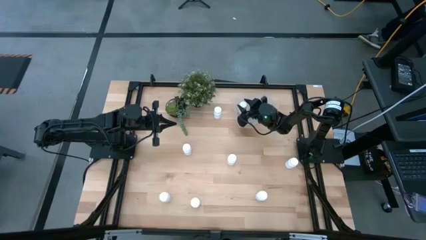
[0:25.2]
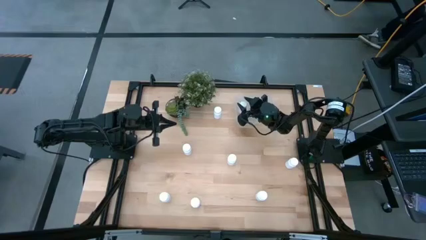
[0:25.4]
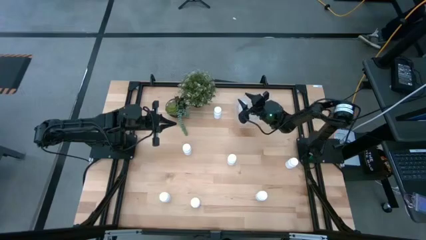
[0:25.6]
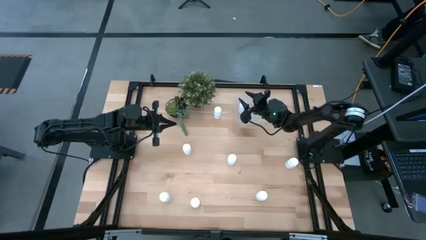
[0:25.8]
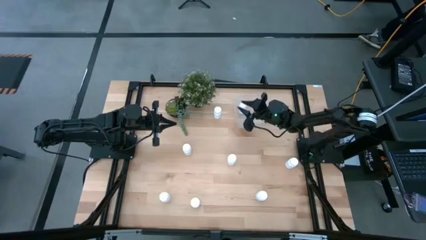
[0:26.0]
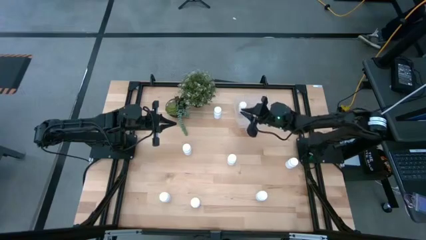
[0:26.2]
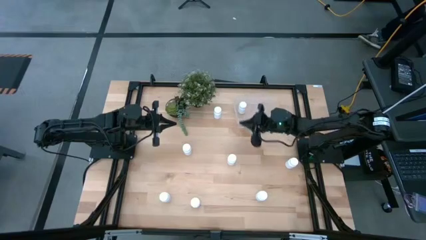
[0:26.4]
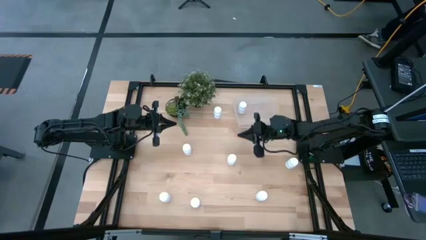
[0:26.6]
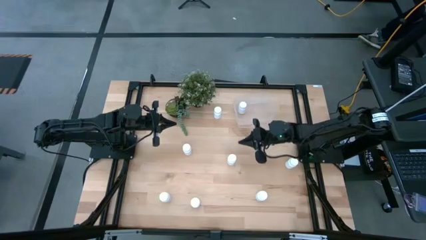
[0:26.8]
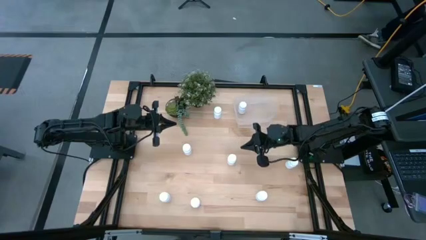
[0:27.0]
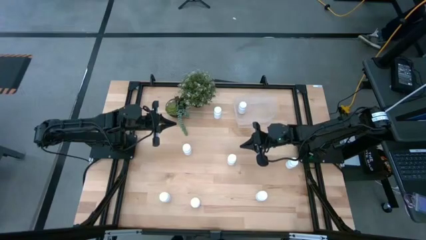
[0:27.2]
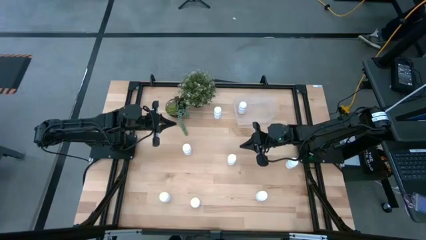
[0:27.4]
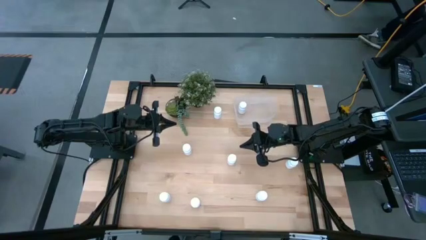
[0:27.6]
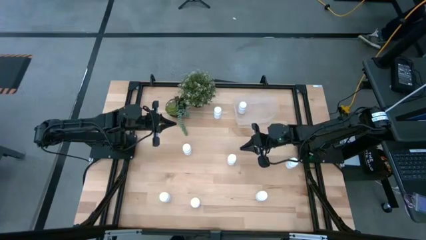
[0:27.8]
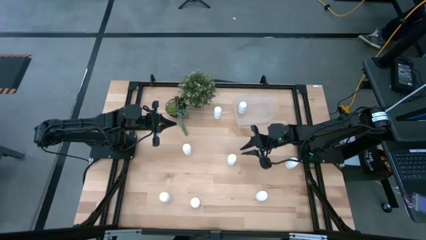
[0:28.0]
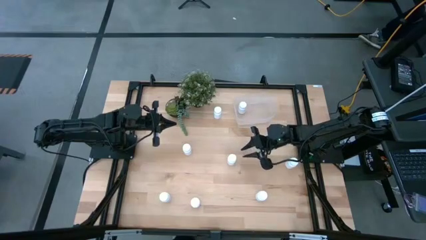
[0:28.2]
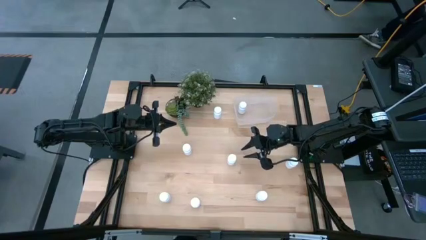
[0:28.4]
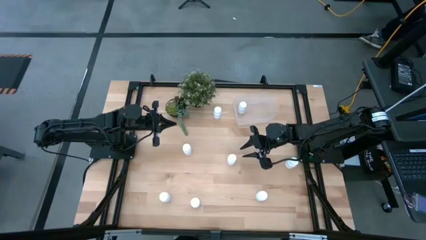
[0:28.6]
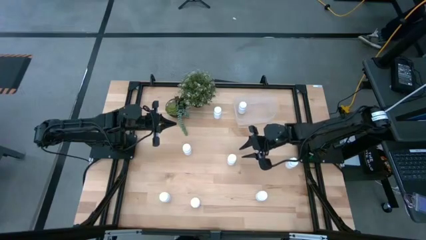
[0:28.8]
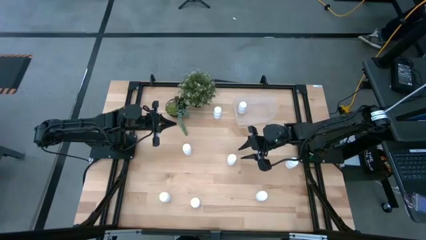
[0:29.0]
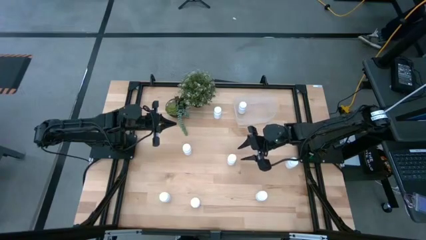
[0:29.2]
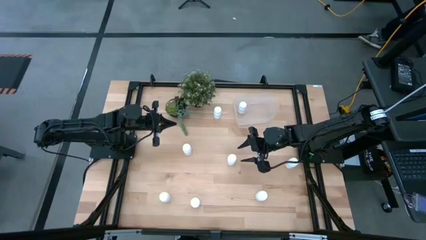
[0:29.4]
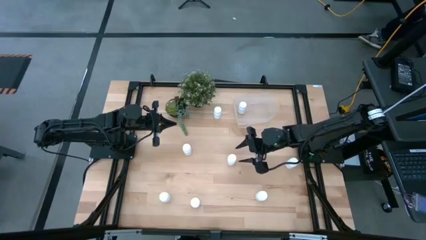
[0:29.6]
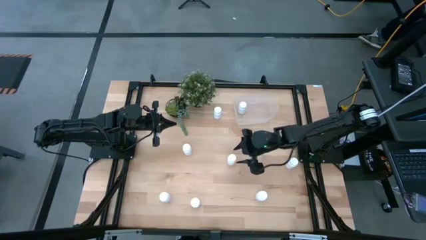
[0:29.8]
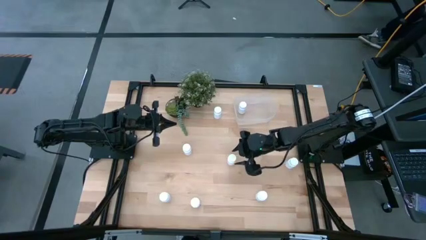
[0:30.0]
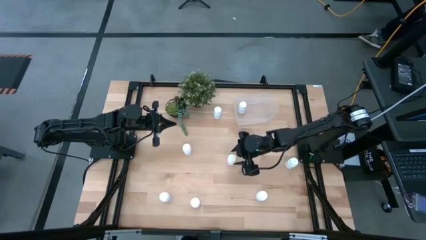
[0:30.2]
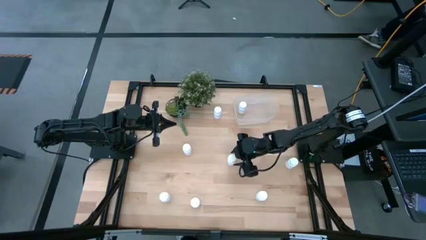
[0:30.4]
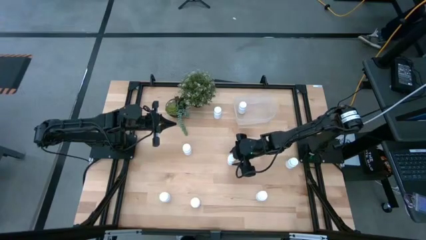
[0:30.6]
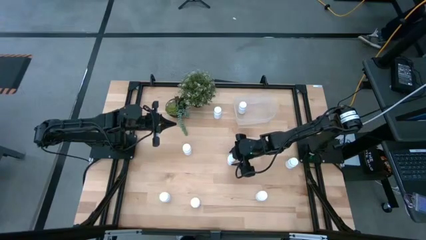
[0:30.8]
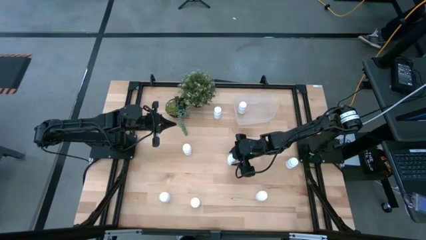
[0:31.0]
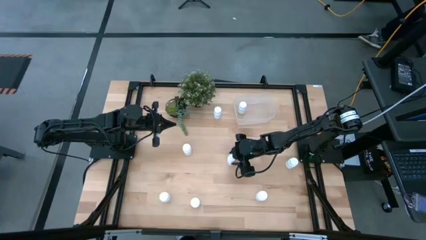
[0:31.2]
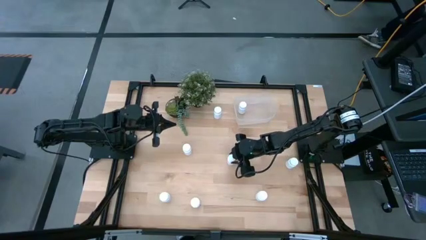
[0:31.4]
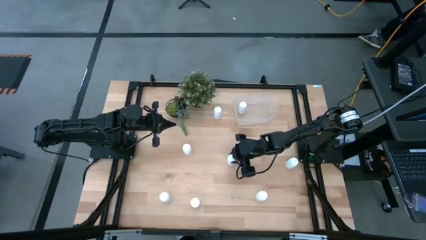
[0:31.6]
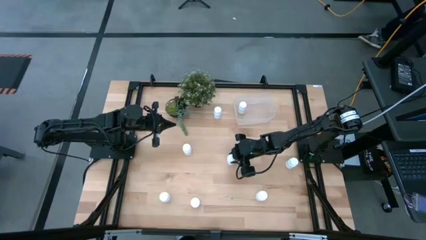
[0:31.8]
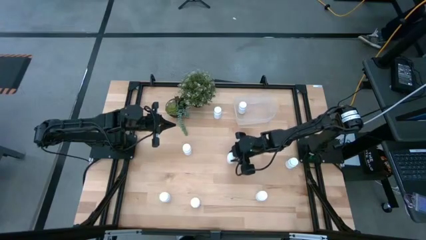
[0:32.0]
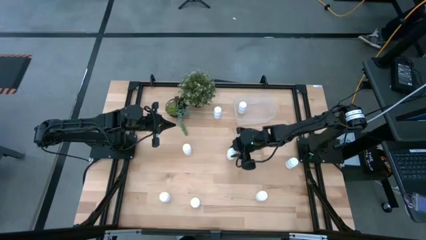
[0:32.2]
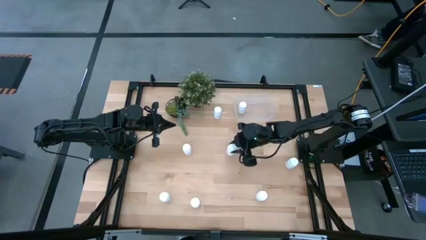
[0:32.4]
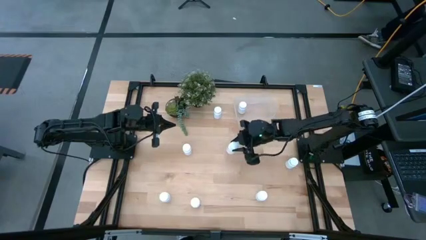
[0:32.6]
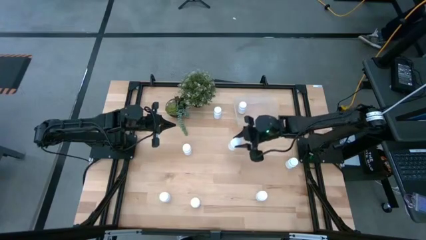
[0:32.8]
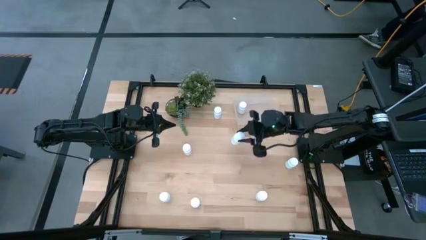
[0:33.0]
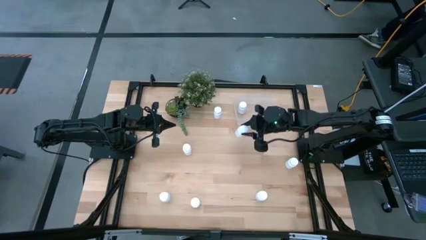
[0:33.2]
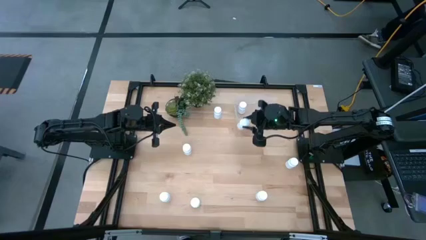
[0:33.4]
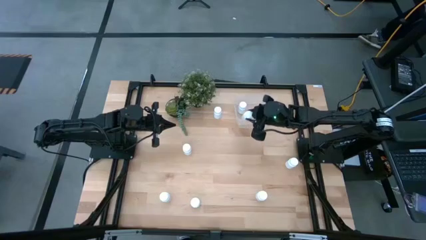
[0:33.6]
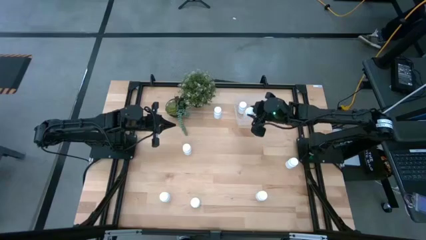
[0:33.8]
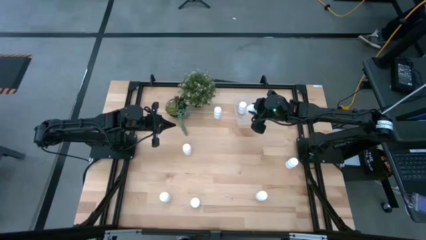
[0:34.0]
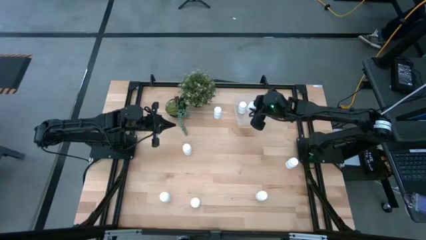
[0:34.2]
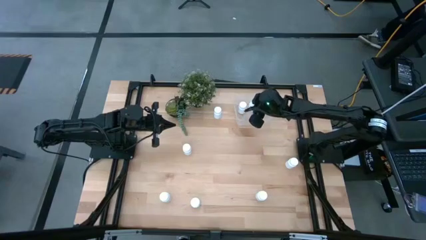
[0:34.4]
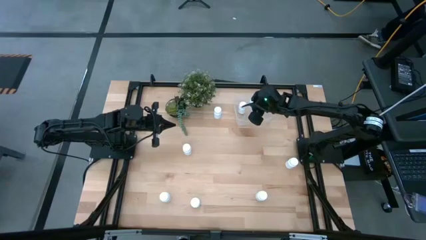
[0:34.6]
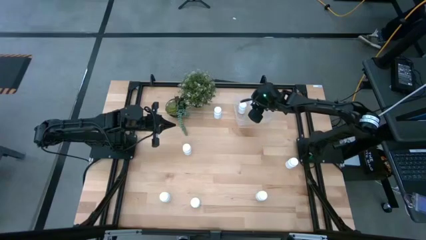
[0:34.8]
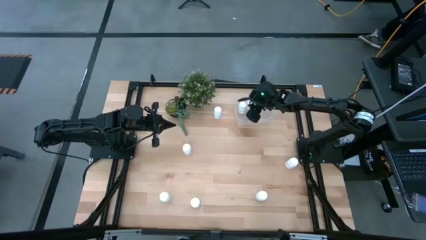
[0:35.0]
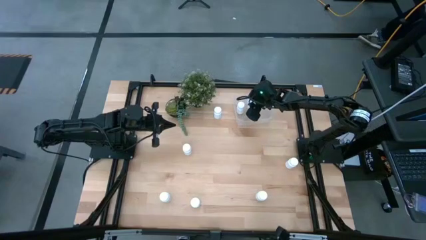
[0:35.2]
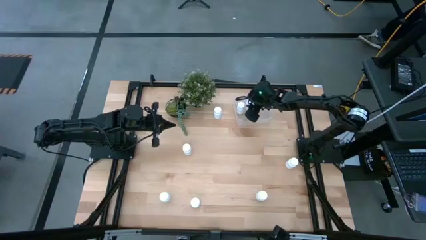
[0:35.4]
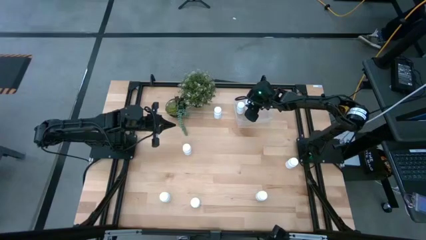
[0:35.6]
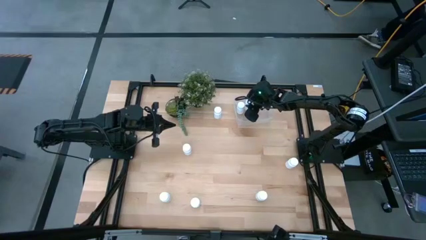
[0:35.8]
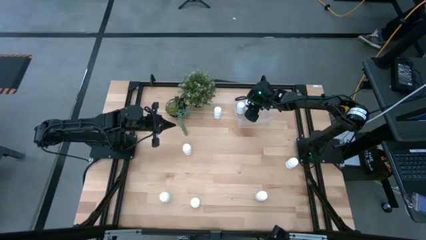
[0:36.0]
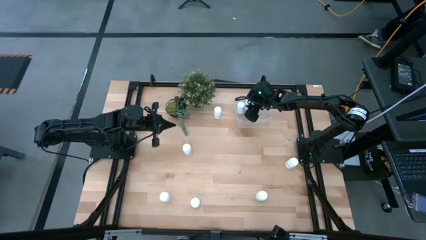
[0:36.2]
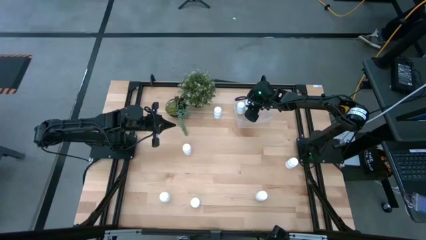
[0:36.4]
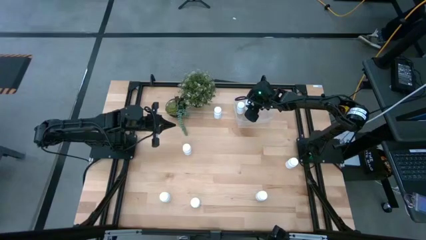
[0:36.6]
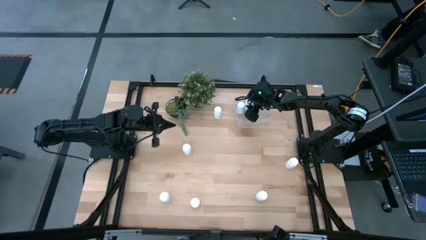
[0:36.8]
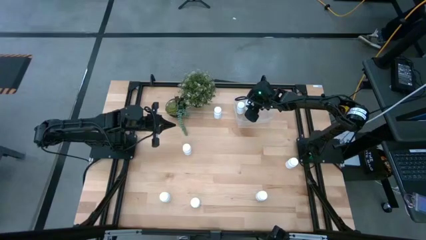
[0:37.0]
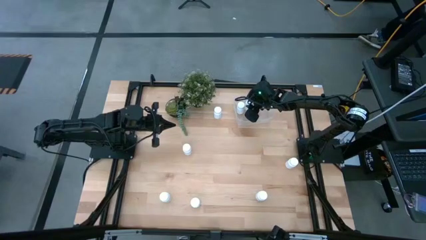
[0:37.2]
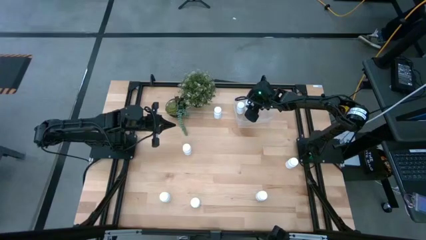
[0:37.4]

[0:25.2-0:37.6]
Task: Pick and place pill bottles into a basket
Put the white pill bottle into the transparent bin

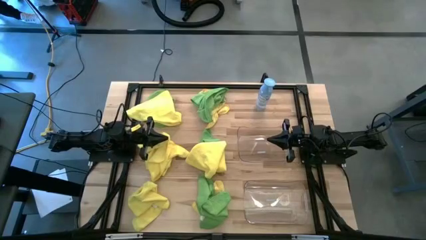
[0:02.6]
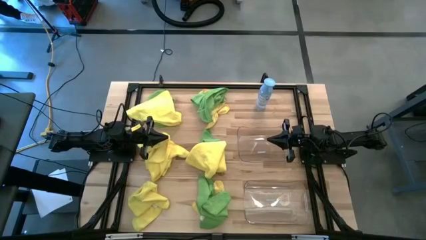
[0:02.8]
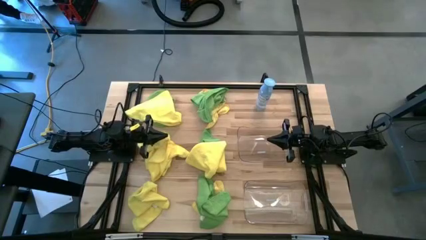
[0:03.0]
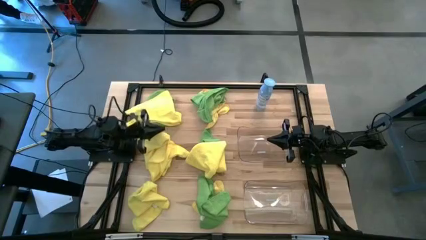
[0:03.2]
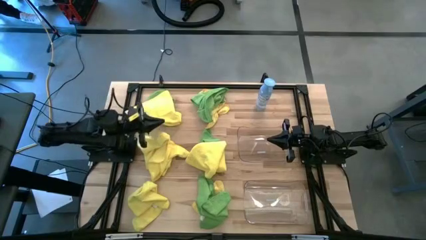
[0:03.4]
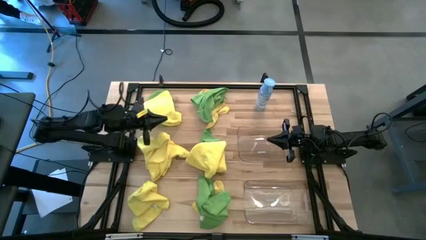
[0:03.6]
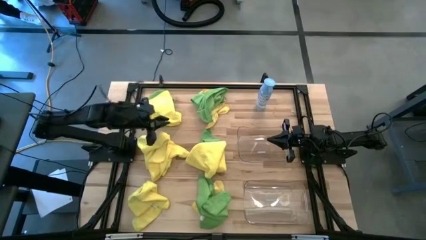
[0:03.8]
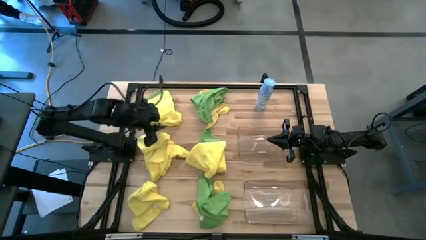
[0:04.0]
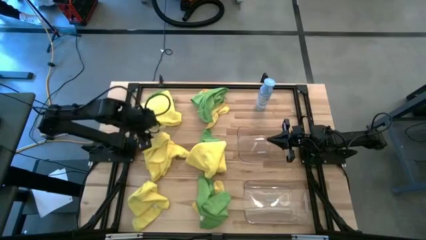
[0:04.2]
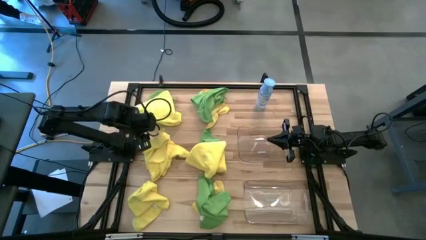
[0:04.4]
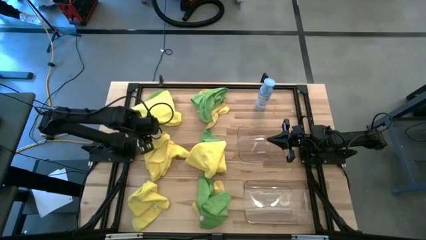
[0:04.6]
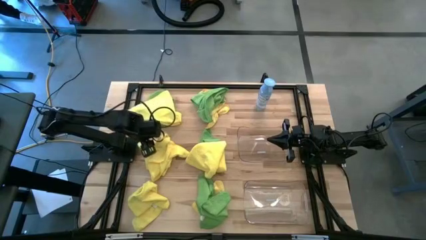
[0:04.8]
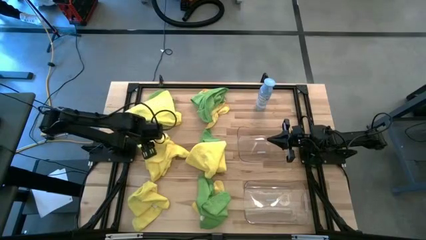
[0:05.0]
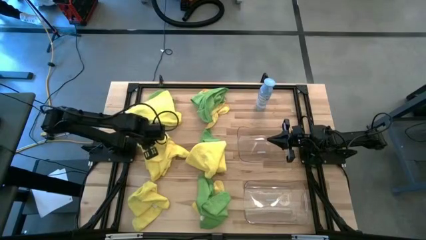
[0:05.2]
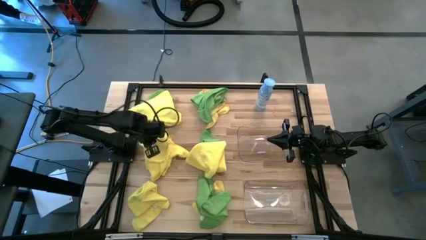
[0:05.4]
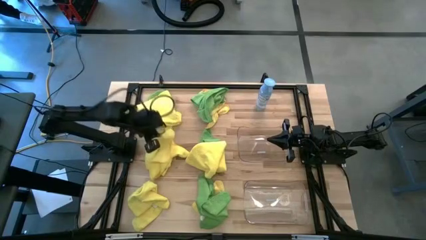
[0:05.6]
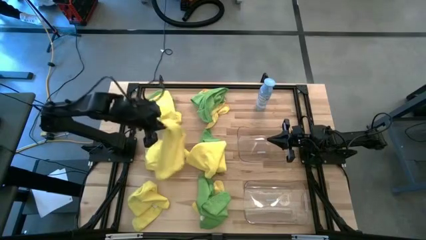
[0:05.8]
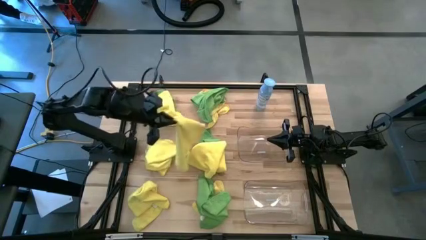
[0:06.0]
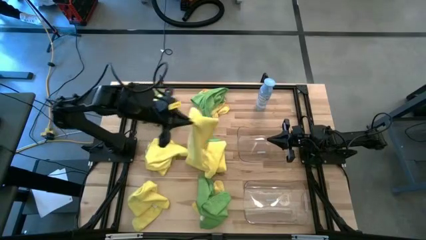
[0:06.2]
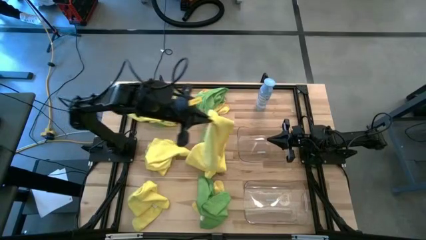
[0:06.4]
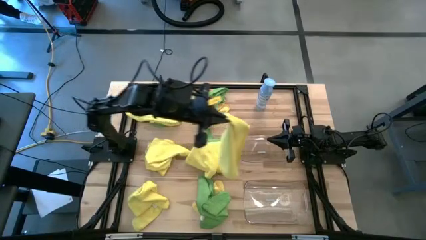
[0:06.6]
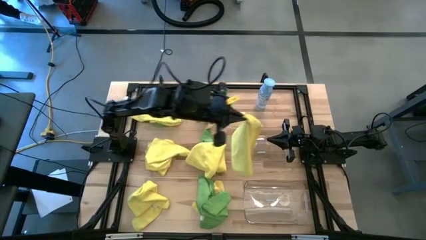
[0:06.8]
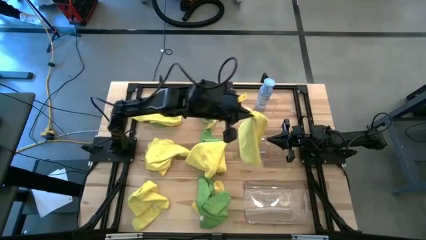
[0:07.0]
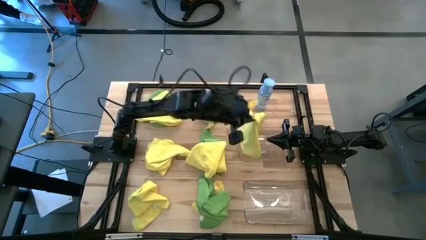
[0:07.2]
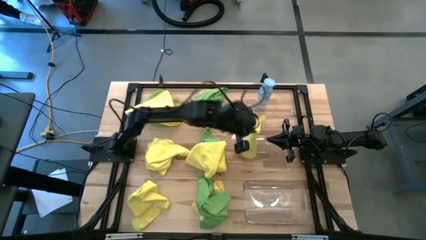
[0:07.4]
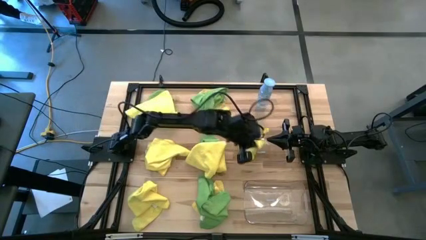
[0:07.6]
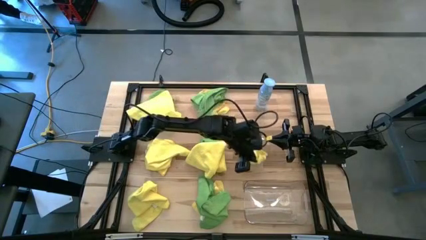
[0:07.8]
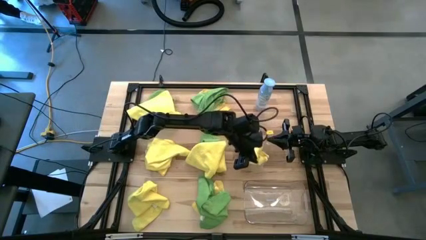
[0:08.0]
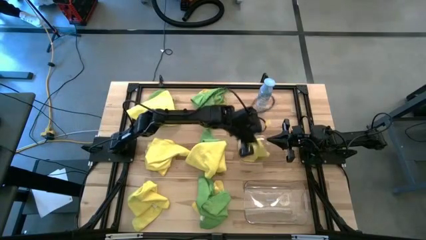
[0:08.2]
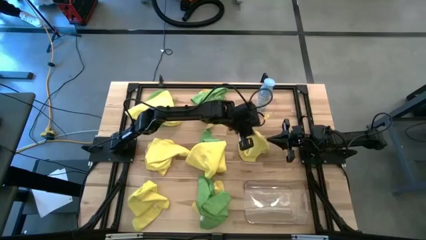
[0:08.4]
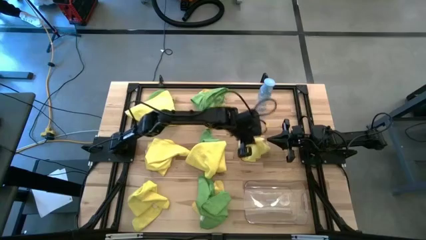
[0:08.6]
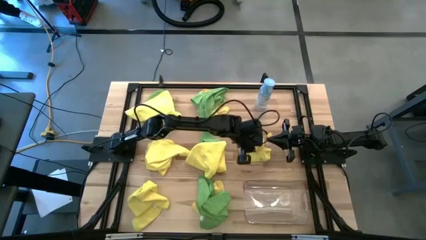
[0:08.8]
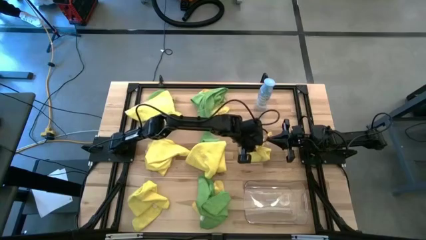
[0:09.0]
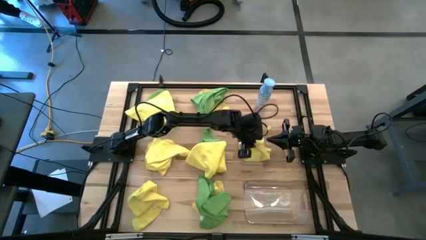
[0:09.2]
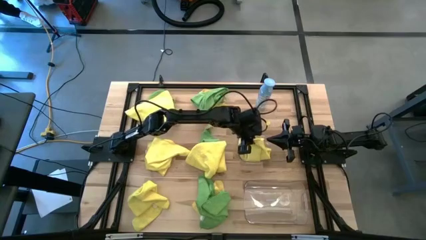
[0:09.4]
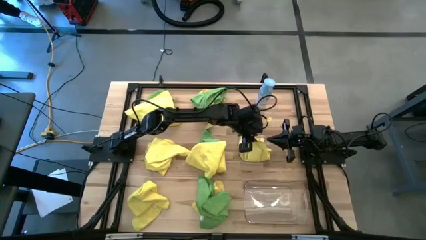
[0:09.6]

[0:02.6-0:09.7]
Task: Sort microfiber towel by color & place in baskets
Put the yellow microfiber towel into the top transparent bin
